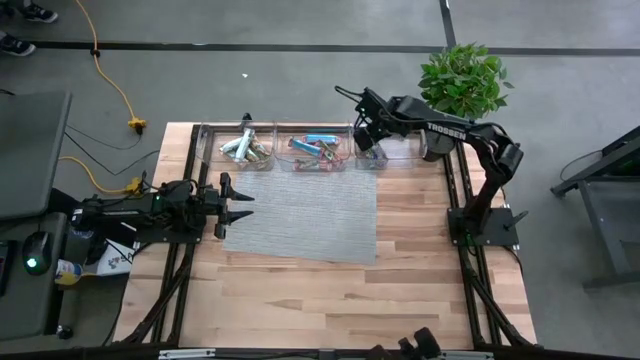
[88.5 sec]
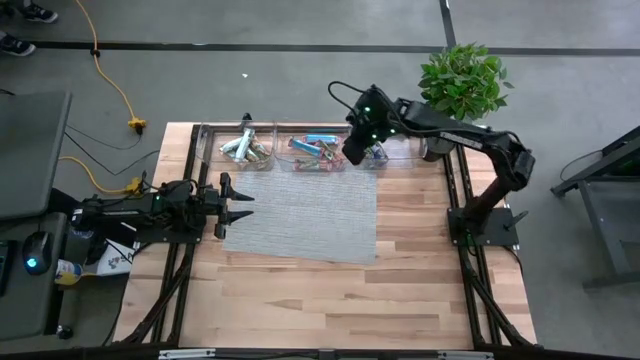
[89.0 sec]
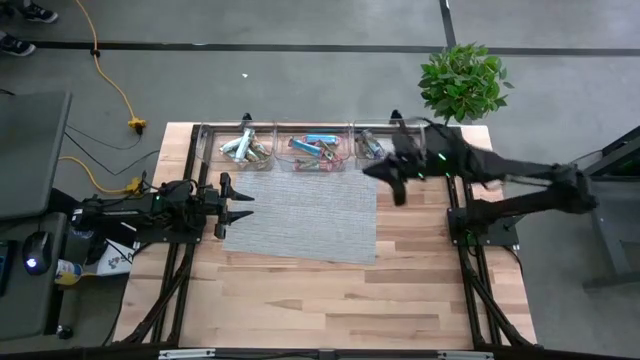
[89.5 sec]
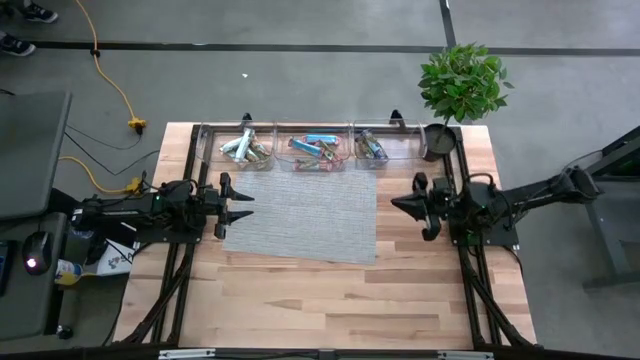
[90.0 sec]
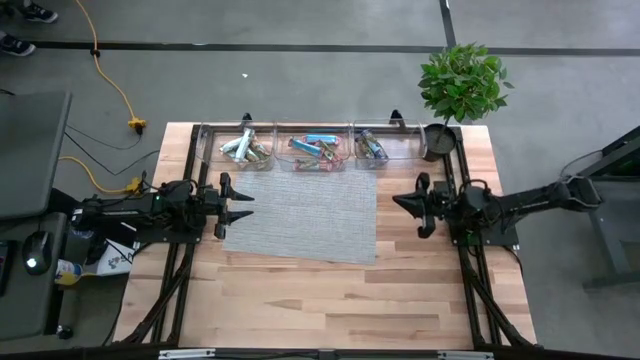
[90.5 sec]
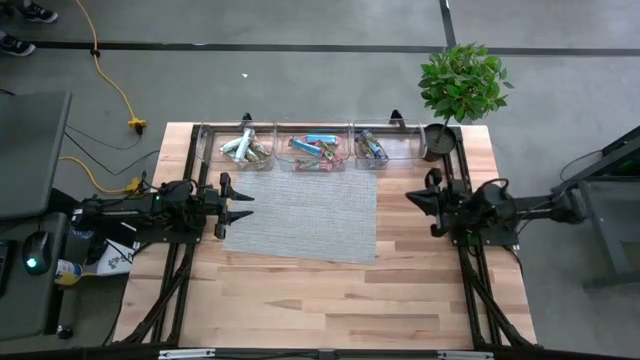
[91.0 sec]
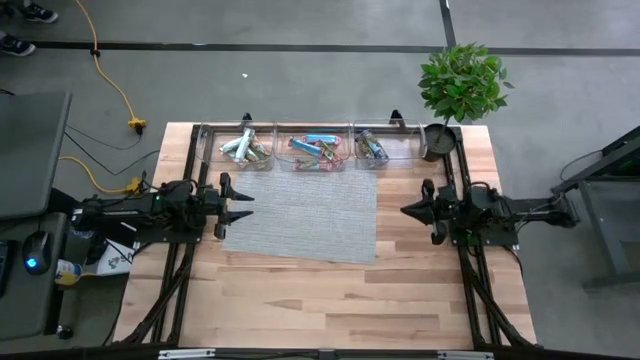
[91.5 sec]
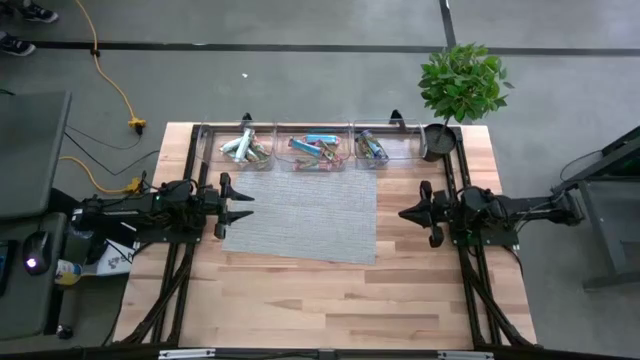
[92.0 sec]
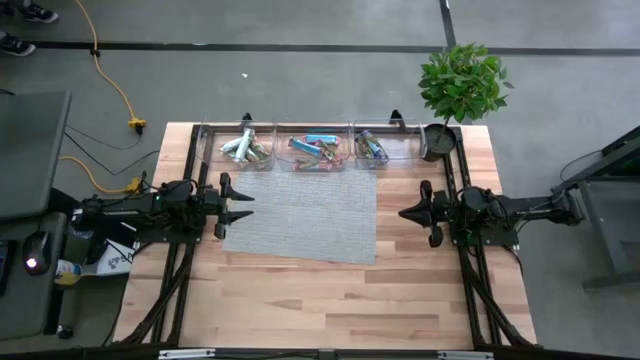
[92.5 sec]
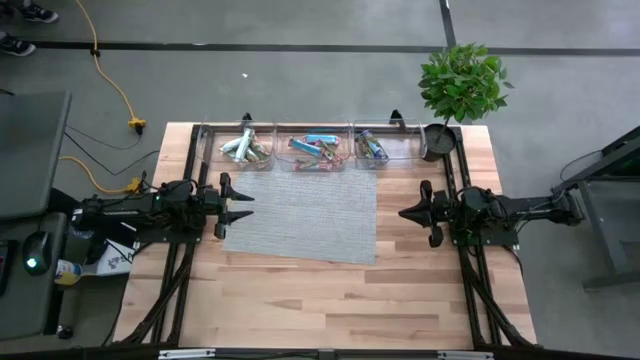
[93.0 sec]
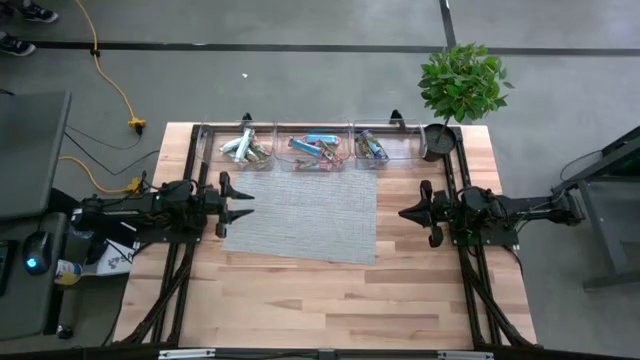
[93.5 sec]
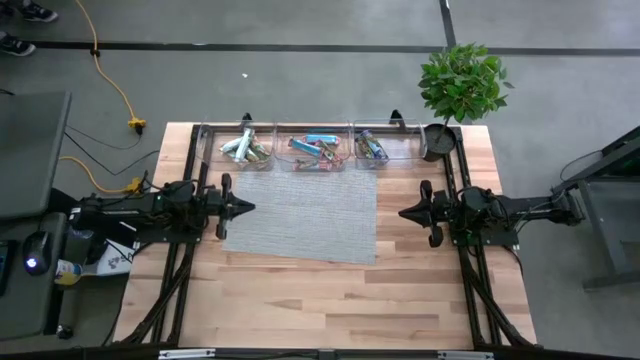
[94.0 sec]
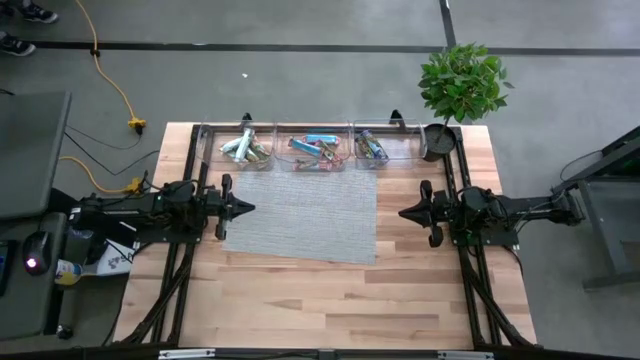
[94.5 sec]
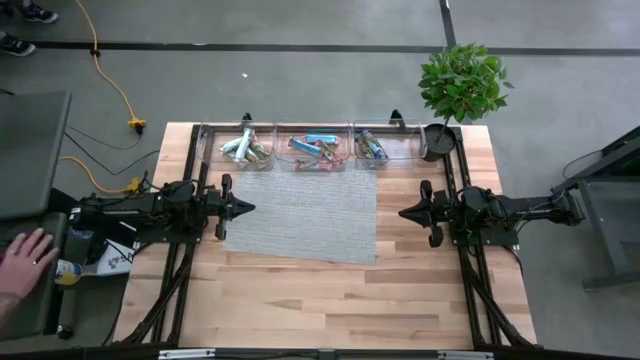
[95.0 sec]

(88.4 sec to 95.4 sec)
Task: Pick and place Granola Bars by type
Return to Home Position

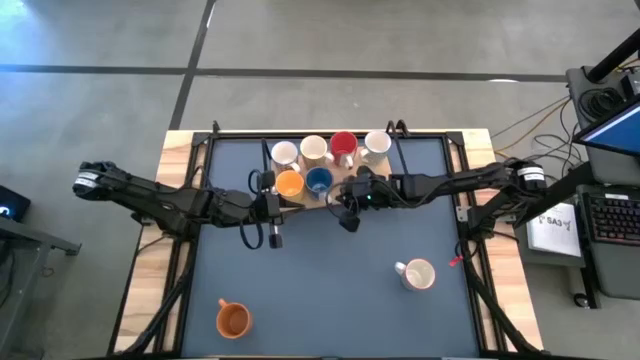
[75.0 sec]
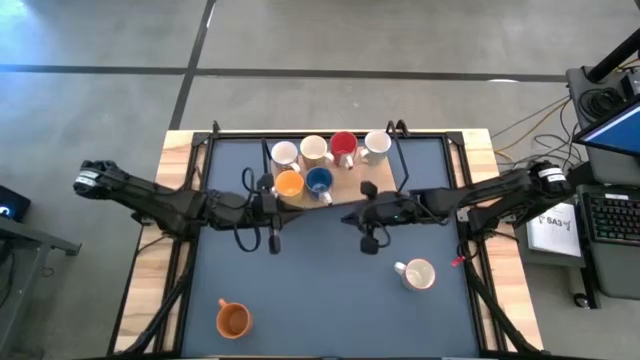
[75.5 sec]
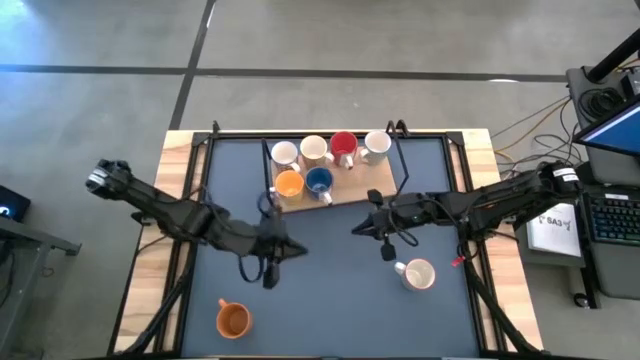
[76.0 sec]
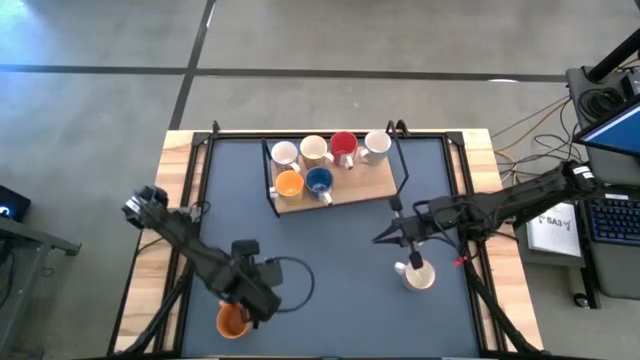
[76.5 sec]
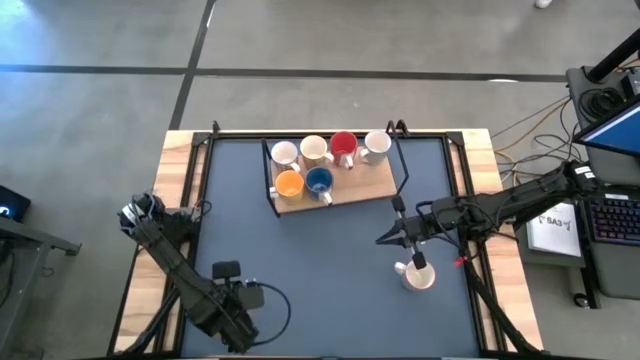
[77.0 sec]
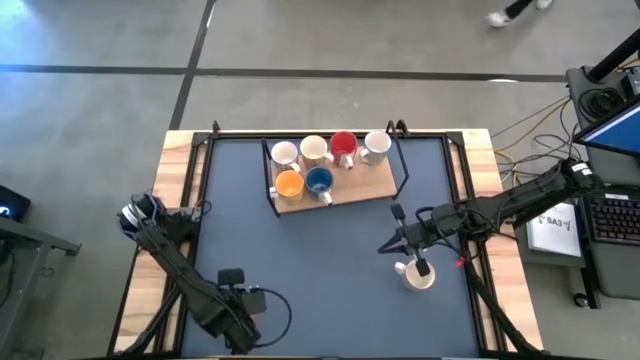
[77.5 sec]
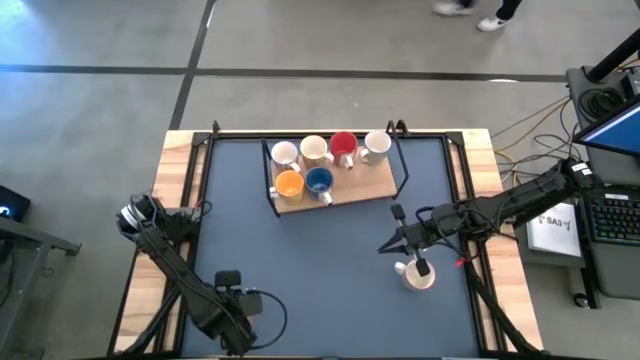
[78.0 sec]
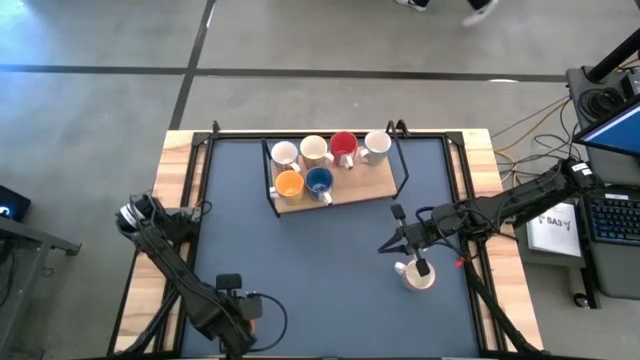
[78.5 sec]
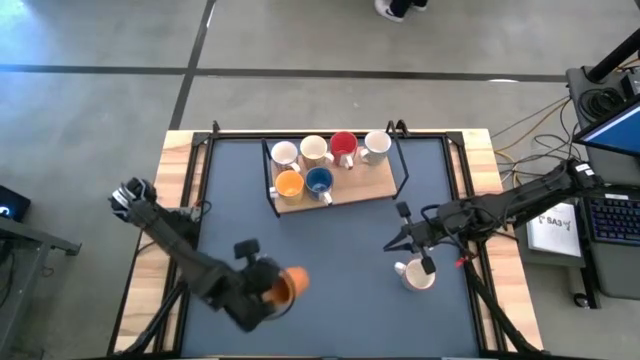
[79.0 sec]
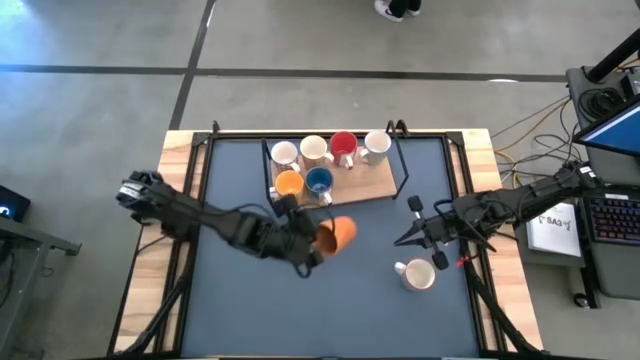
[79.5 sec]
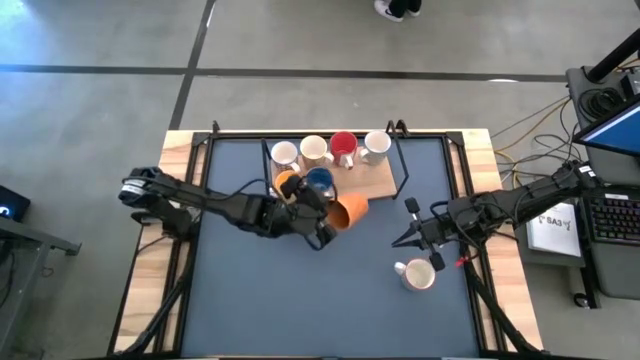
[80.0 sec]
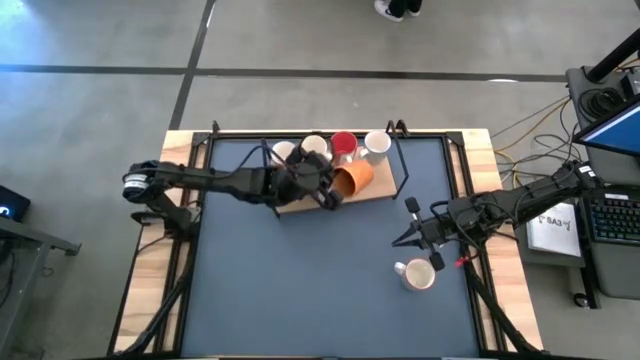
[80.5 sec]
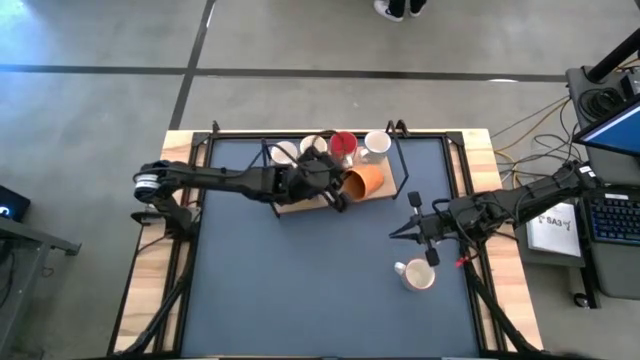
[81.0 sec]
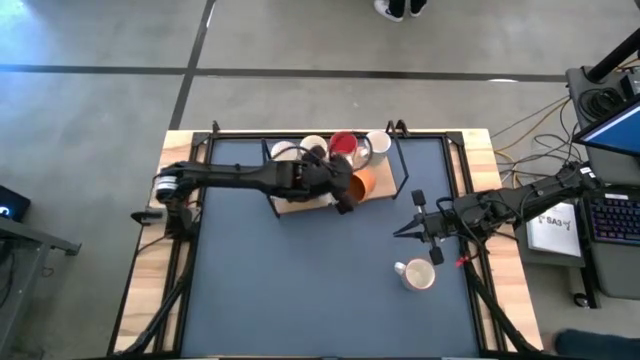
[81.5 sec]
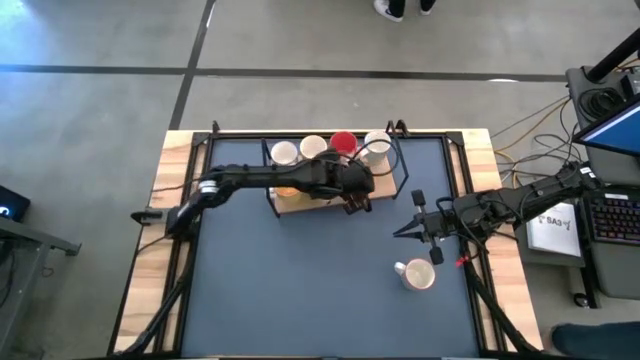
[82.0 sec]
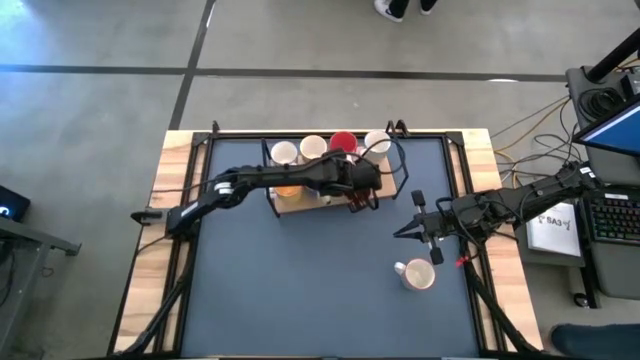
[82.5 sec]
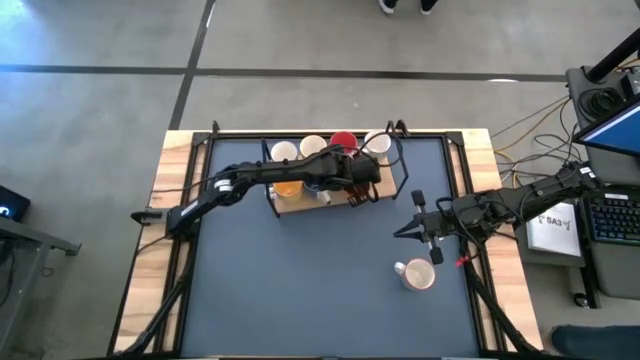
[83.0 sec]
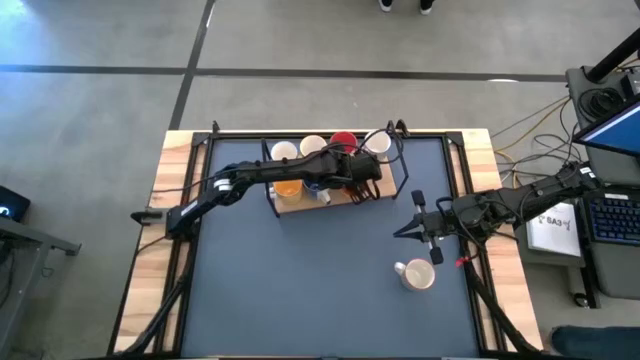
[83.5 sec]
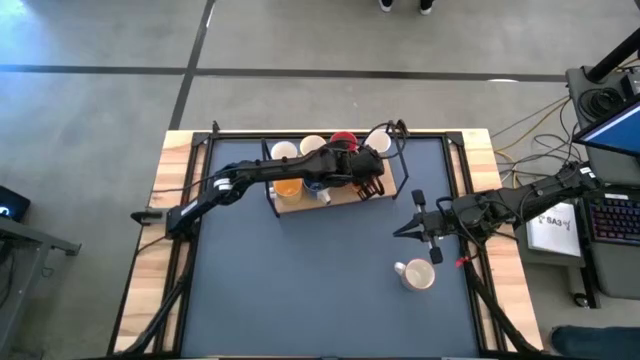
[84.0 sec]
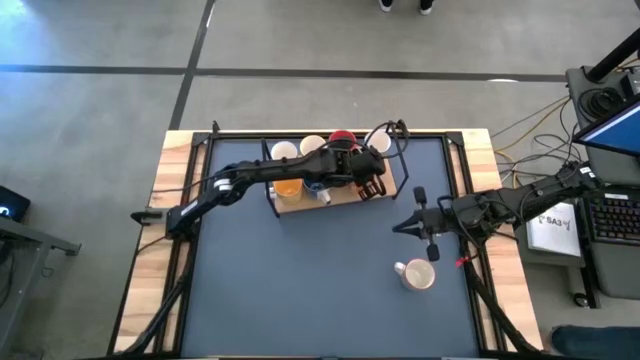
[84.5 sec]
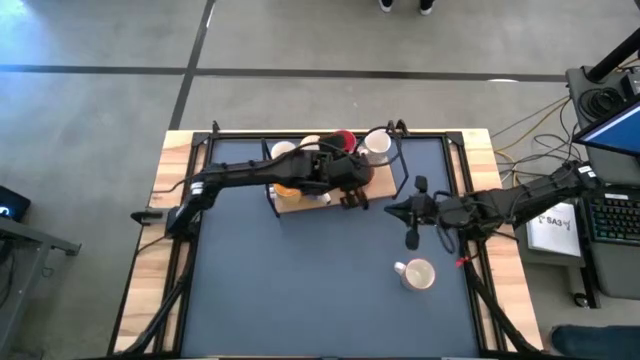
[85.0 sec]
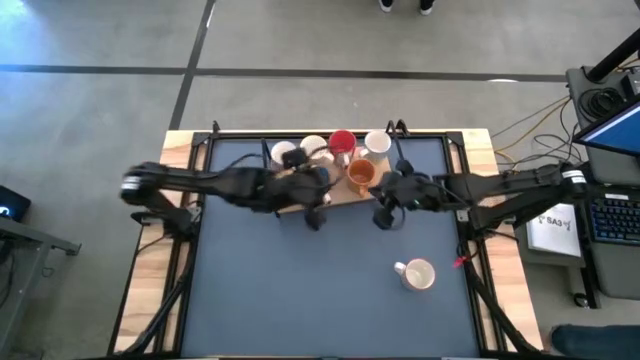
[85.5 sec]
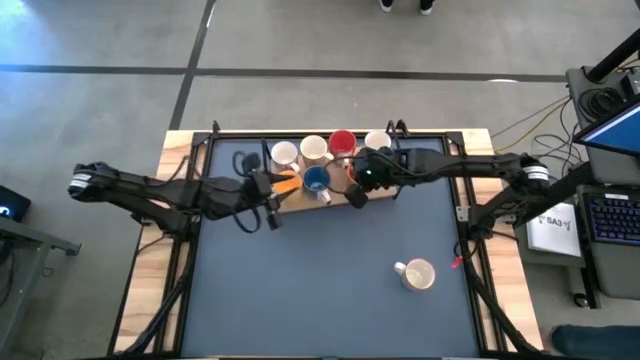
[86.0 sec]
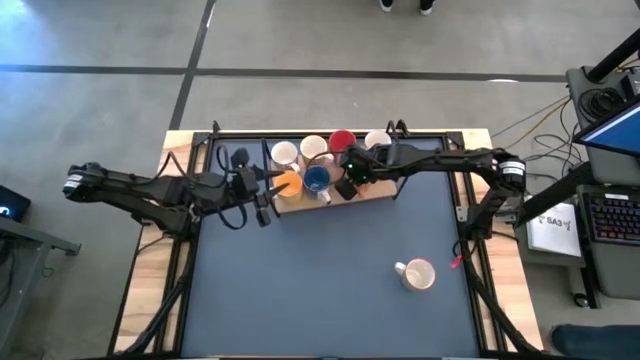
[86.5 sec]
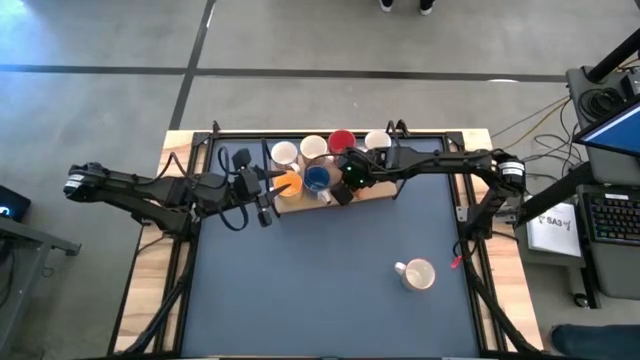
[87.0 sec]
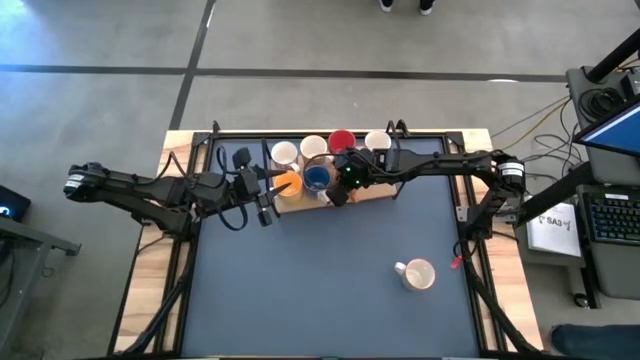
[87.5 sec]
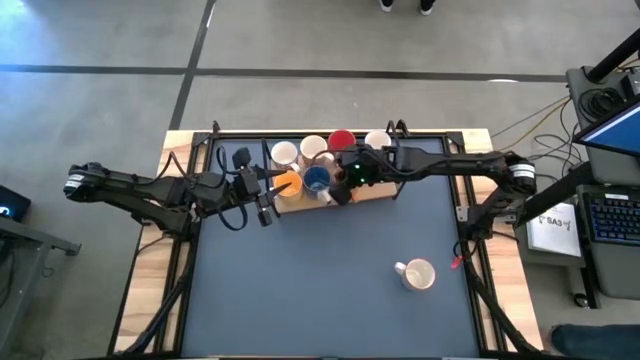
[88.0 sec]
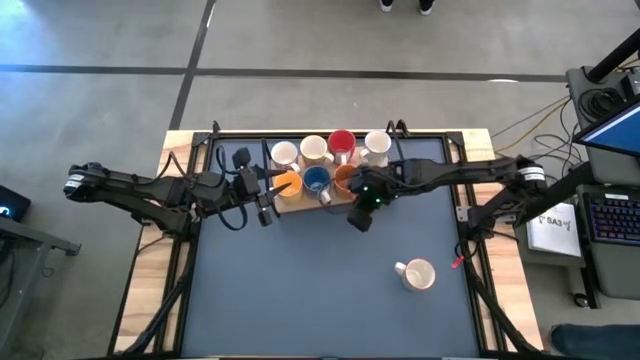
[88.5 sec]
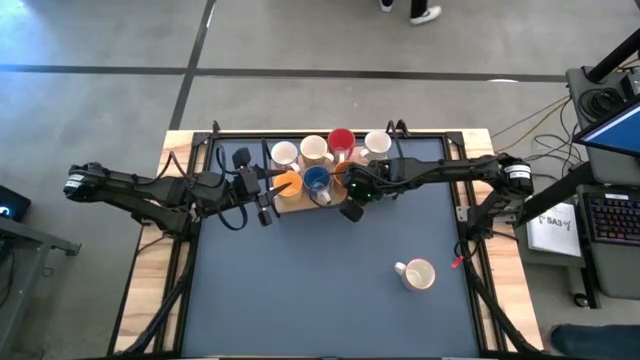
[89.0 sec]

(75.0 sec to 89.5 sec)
Task: Place coffee mugs
Put the orange mug on the shelf
